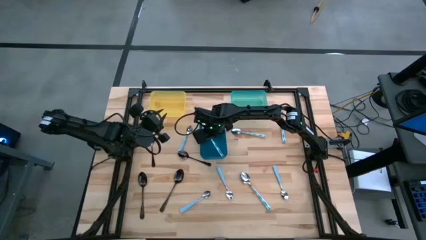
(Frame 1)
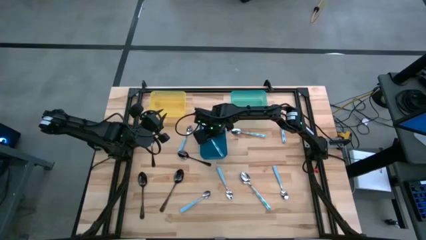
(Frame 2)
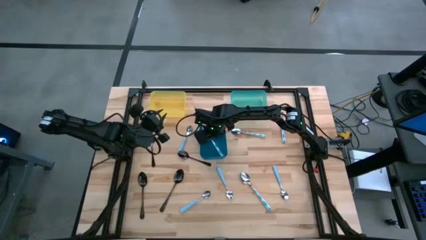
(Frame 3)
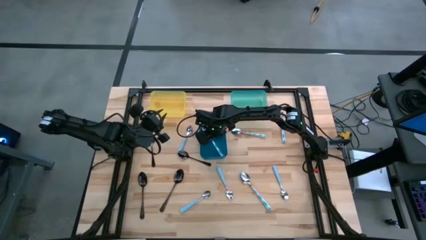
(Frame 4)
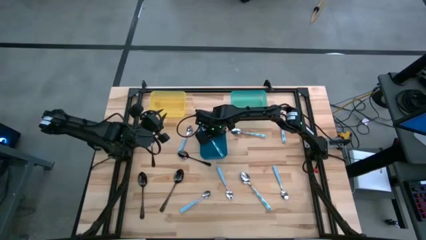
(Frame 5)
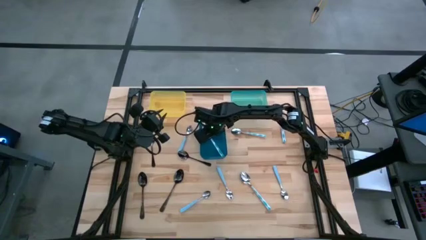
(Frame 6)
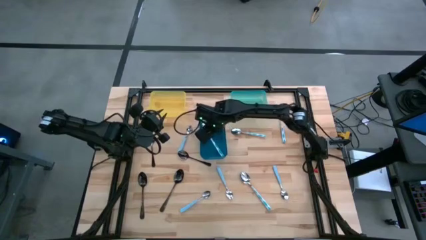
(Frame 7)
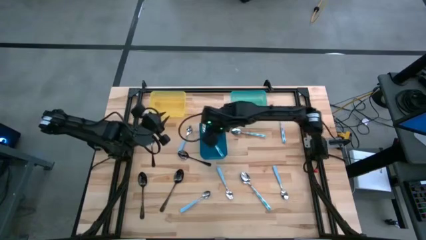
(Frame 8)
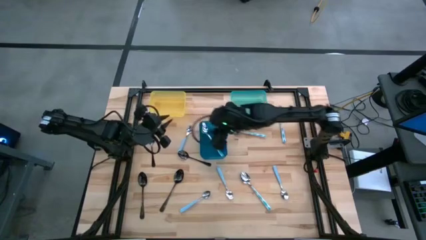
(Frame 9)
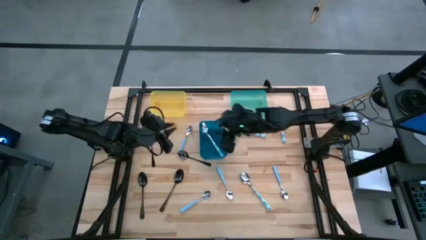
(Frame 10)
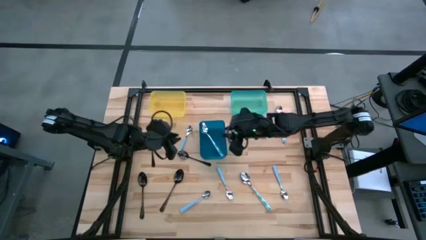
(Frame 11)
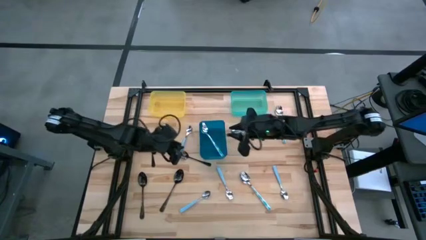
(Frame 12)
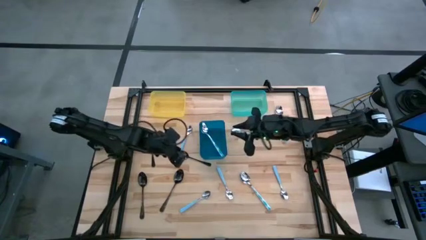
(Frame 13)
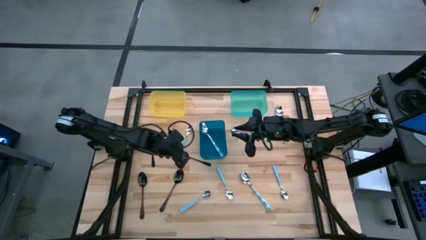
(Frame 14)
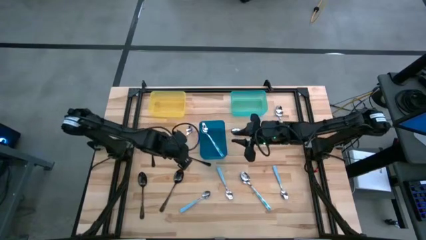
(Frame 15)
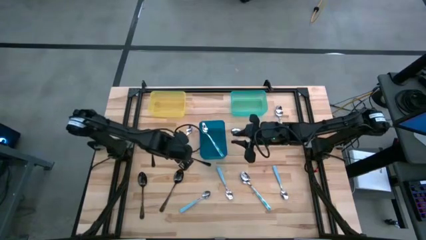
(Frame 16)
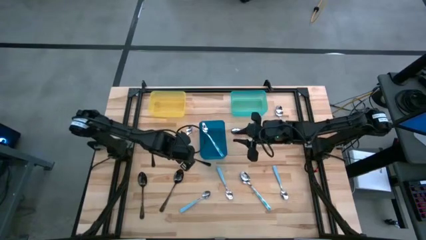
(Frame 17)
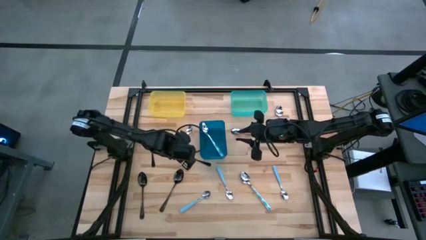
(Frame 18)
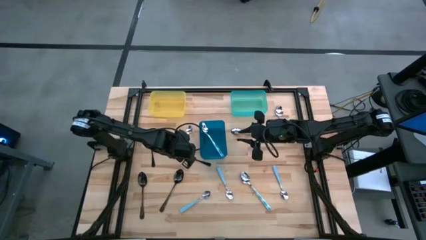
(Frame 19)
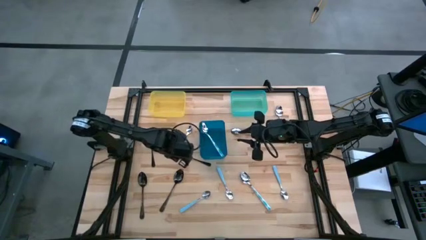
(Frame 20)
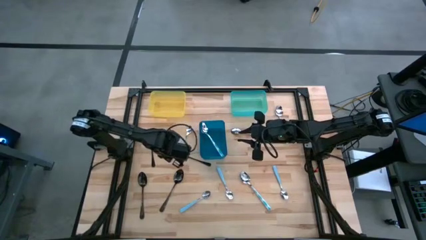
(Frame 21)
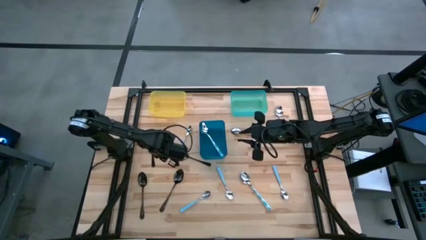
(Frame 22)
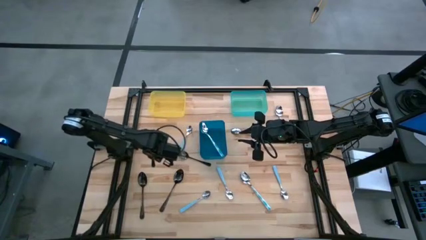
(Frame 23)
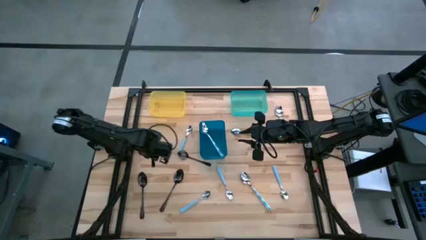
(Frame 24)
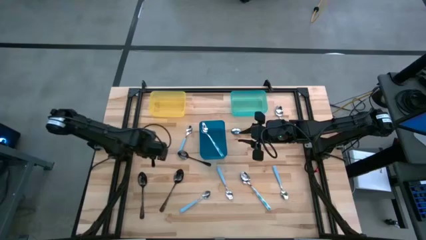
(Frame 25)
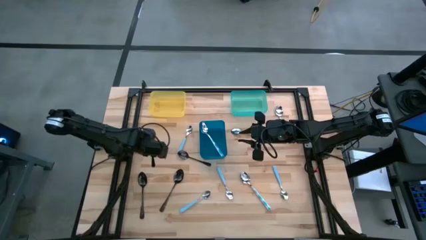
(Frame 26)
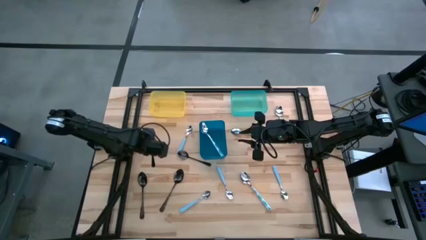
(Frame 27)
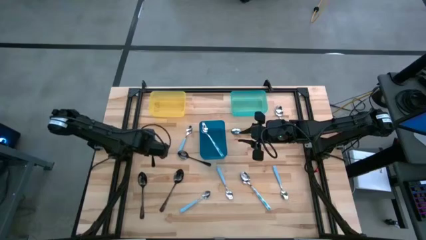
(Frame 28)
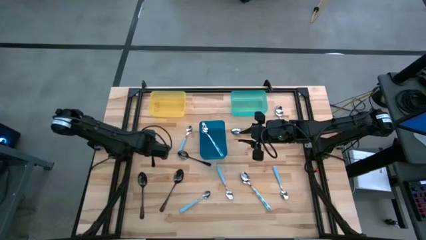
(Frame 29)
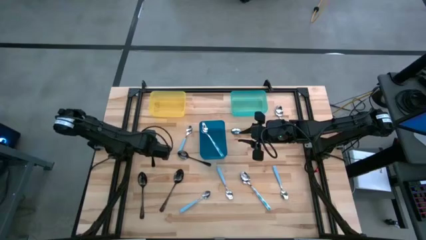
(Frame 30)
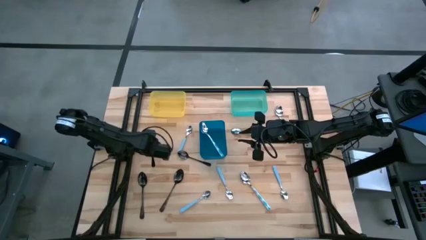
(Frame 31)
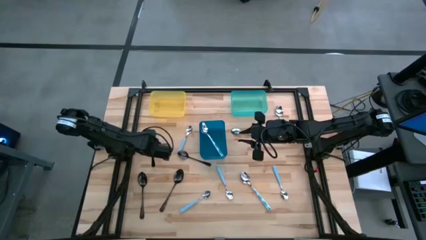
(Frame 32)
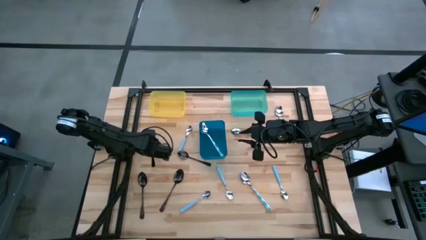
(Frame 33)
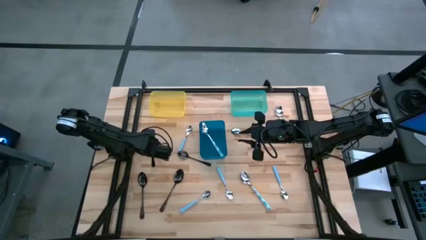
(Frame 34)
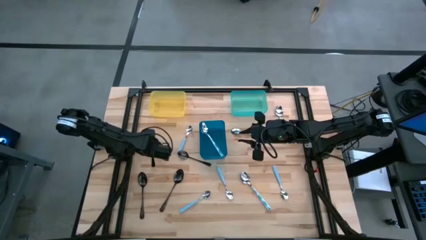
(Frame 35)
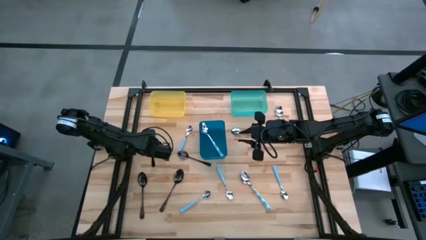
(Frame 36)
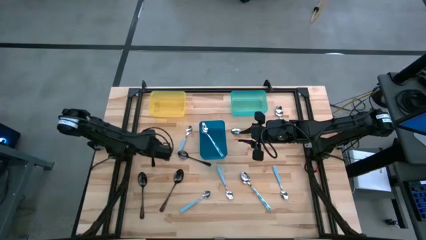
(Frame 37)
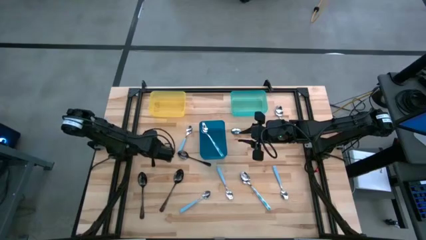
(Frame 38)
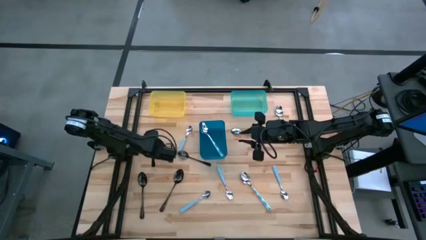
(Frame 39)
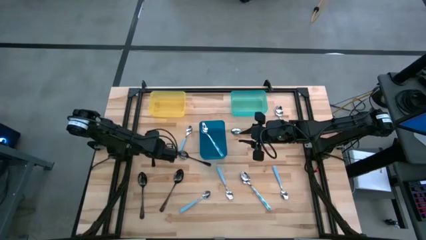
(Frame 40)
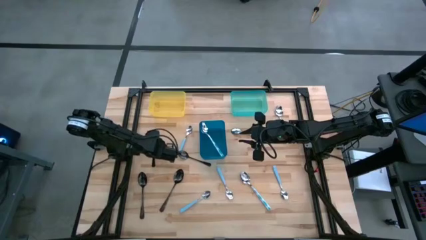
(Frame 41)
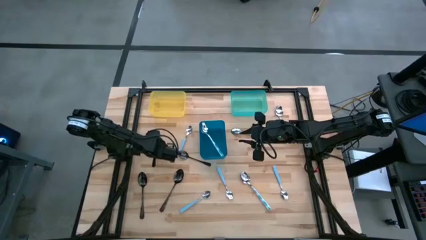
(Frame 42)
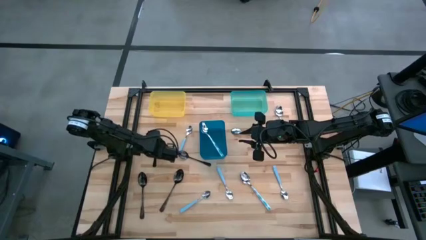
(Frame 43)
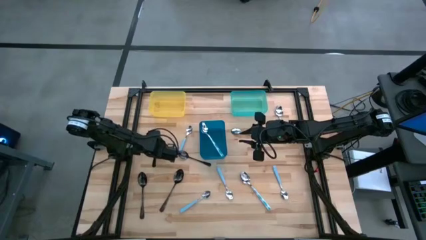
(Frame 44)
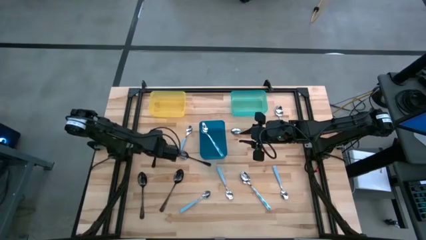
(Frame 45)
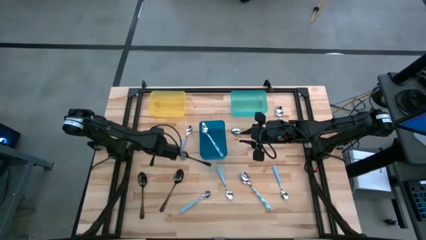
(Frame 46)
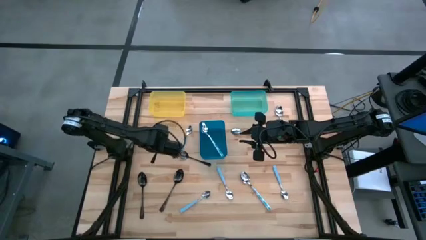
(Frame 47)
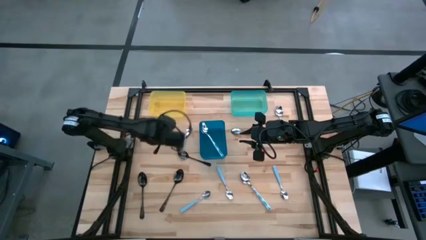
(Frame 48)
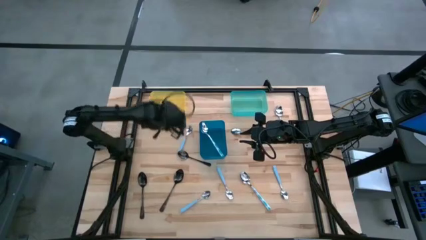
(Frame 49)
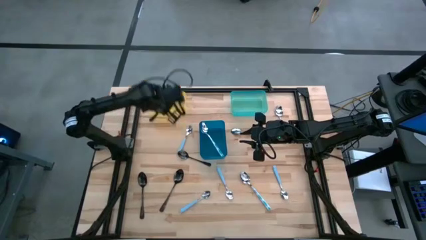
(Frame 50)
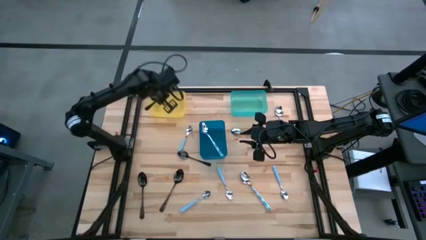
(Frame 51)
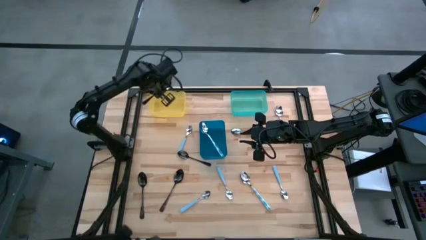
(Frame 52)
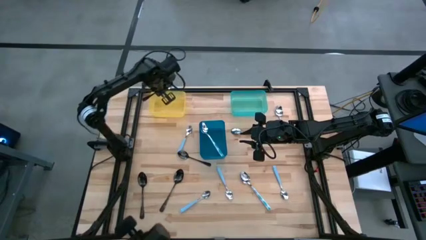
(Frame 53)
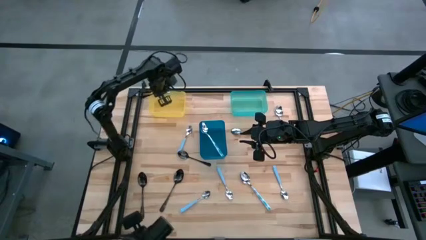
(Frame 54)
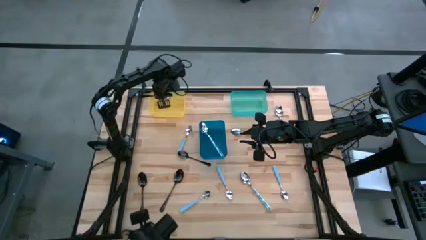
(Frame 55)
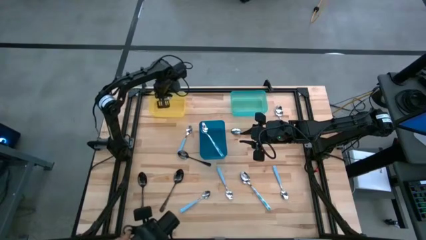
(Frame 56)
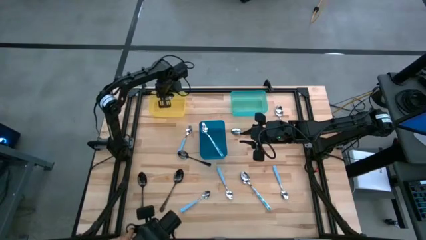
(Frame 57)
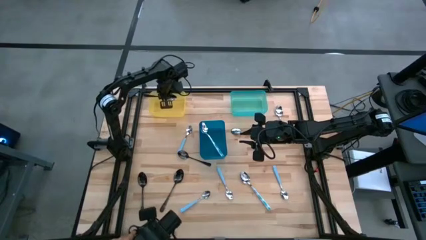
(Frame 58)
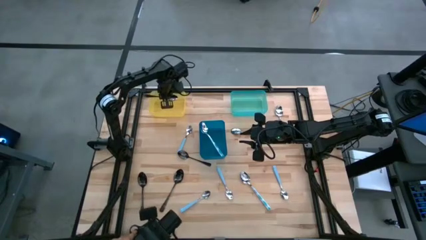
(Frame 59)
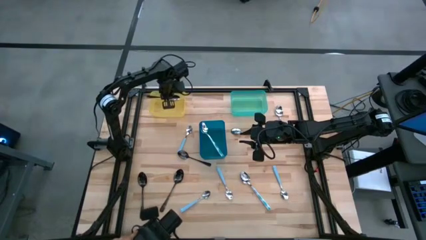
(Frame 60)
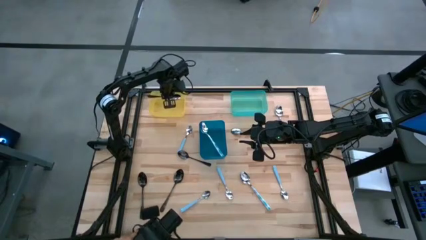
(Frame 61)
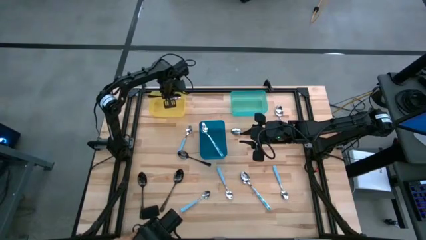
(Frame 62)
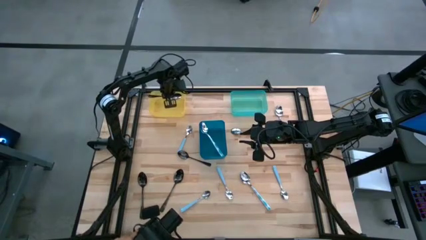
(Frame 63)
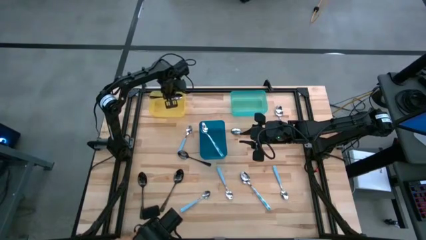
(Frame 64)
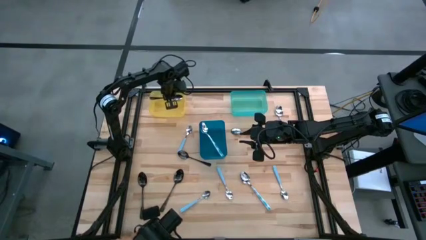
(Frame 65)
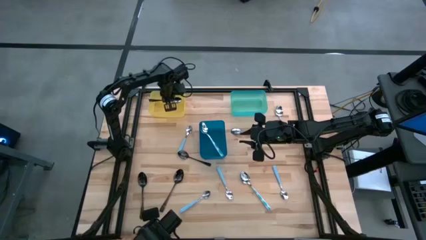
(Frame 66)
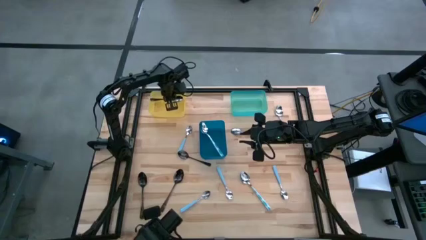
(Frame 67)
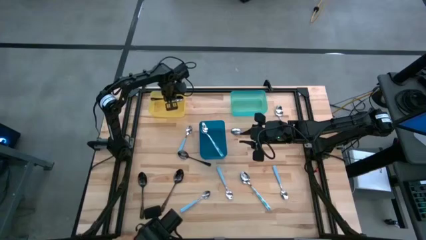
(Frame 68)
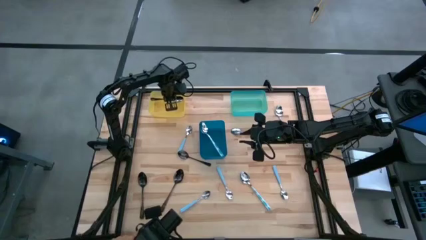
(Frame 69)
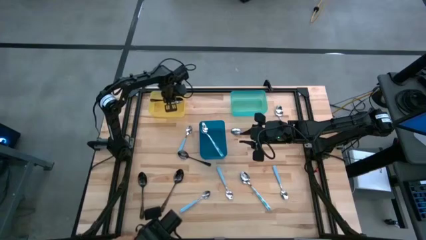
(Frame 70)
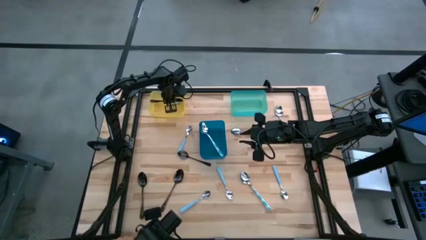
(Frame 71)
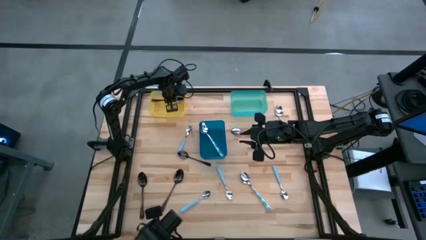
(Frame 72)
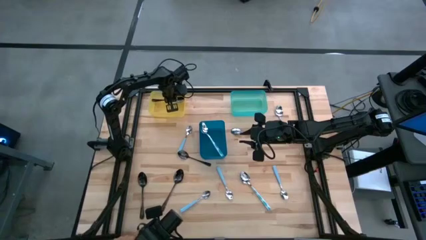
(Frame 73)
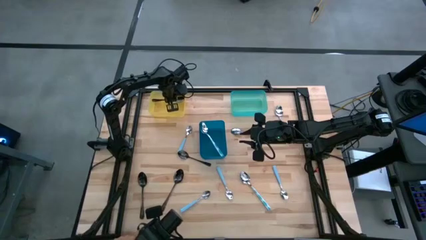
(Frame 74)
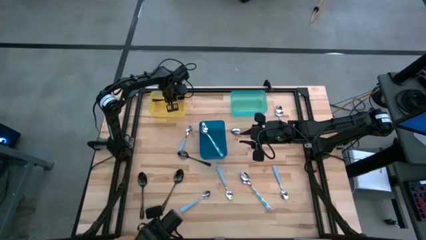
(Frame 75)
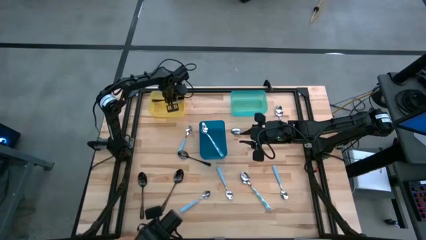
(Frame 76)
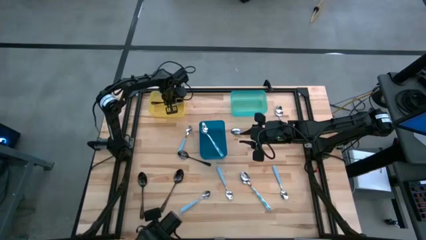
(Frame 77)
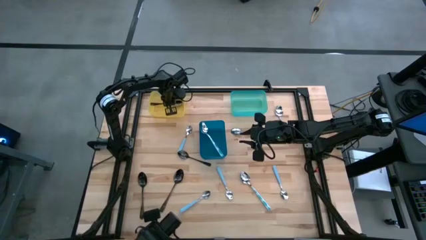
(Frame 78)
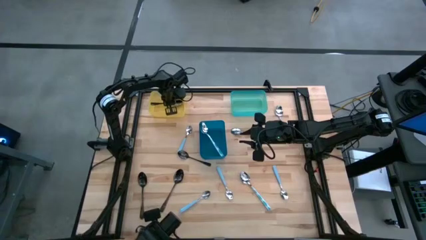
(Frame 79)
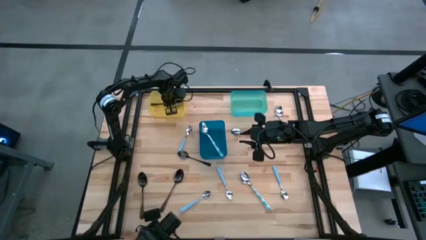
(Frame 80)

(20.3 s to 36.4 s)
Task: Sort silverware by color (type)
Put the black spoon into the yellow bin
